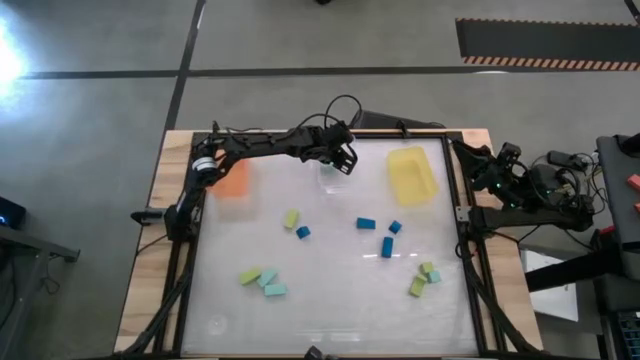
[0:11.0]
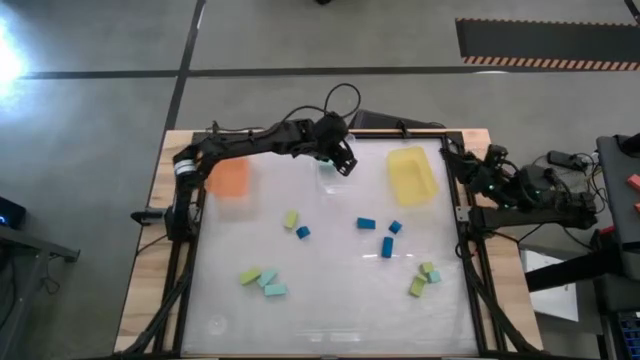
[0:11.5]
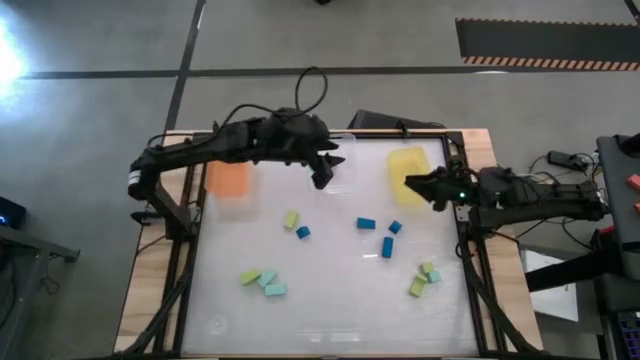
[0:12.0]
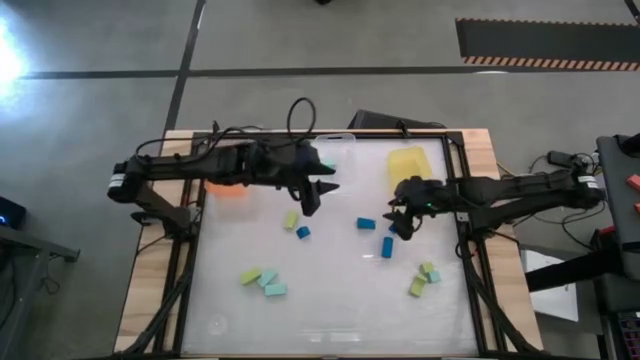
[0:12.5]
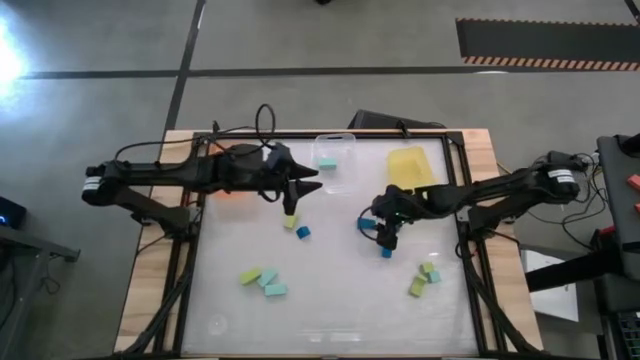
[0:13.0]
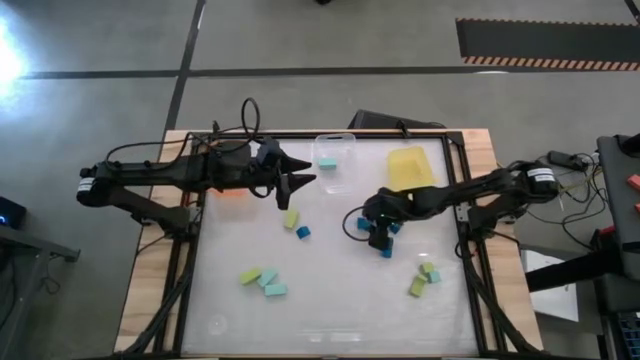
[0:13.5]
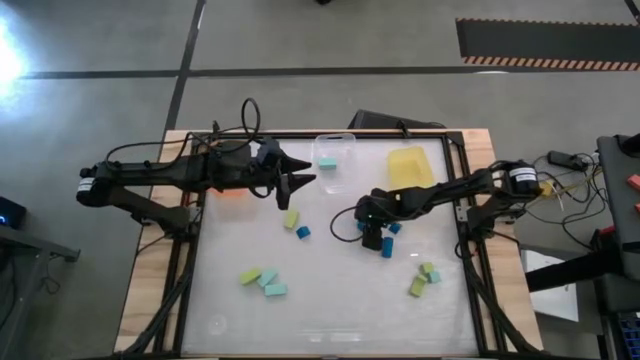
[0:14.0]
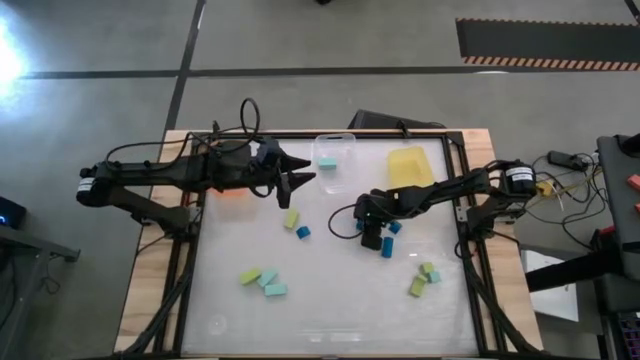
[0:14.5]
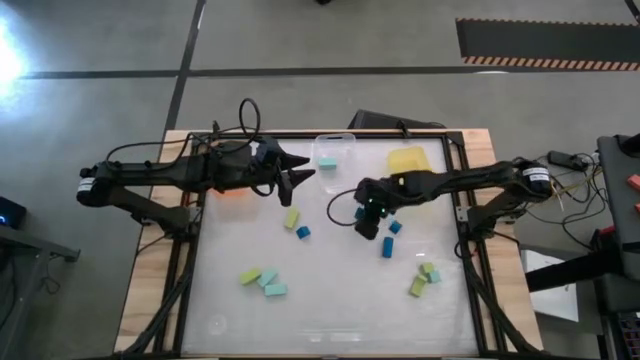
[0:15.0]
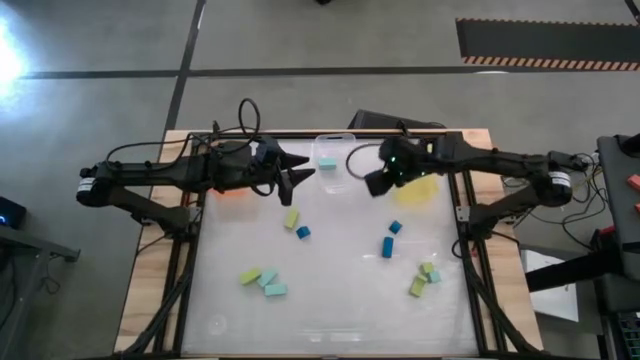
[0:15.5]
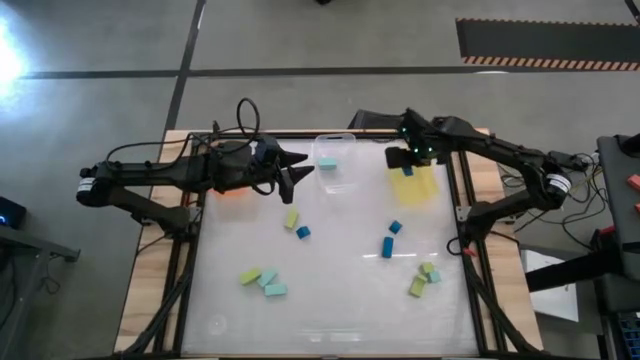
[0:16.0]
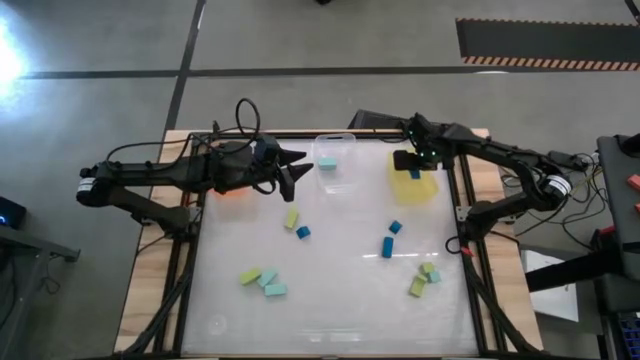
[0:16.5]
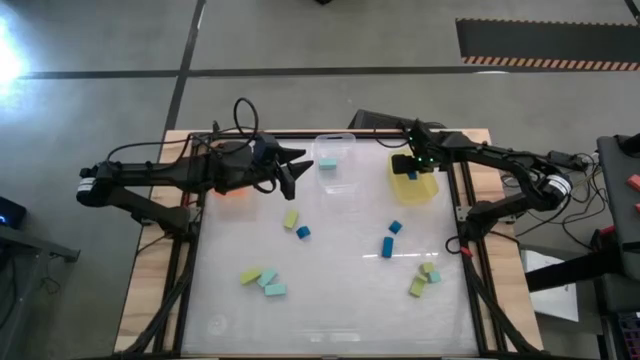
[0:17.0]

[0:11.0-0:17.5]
Task: Sort & place blocks by color
Put the blue block into the yellow bin

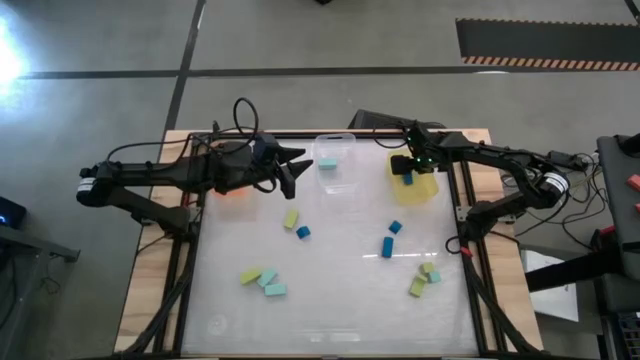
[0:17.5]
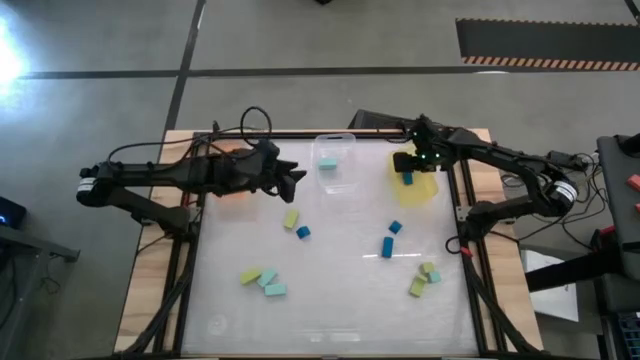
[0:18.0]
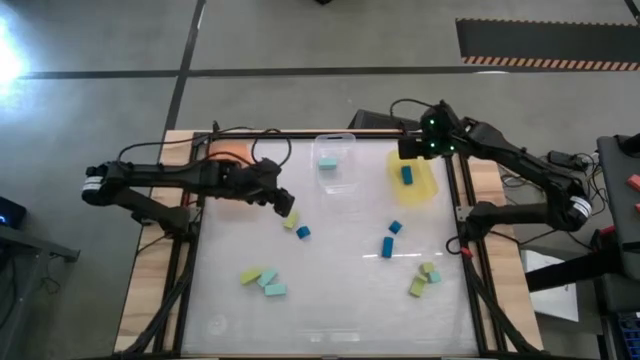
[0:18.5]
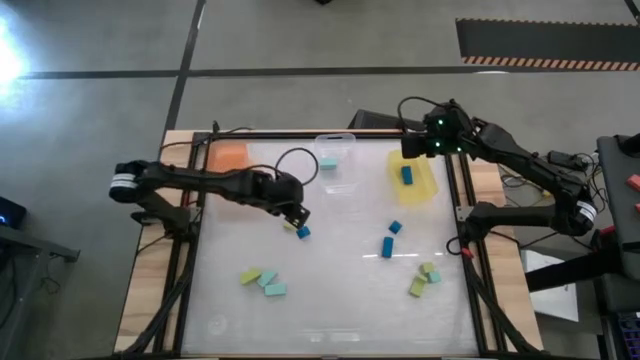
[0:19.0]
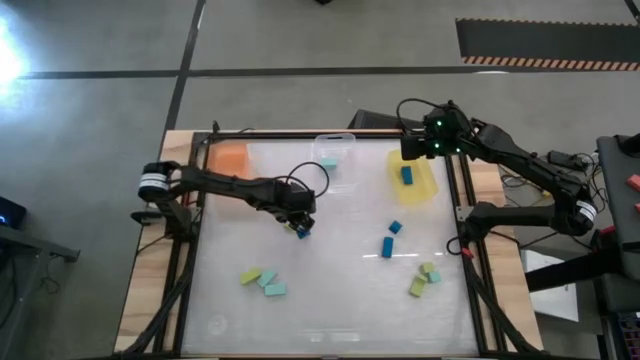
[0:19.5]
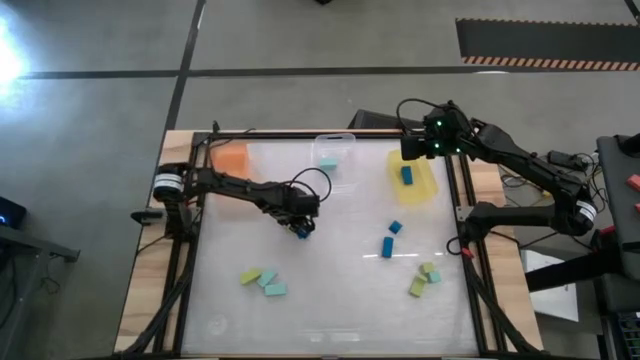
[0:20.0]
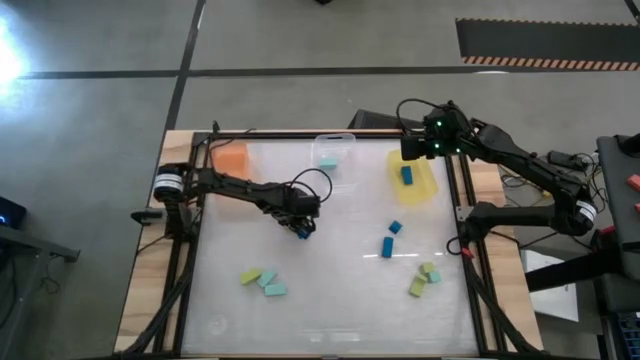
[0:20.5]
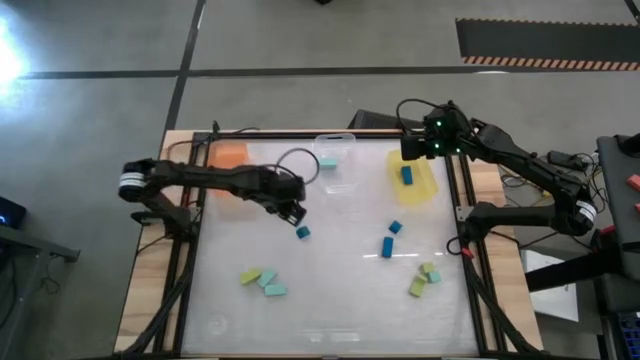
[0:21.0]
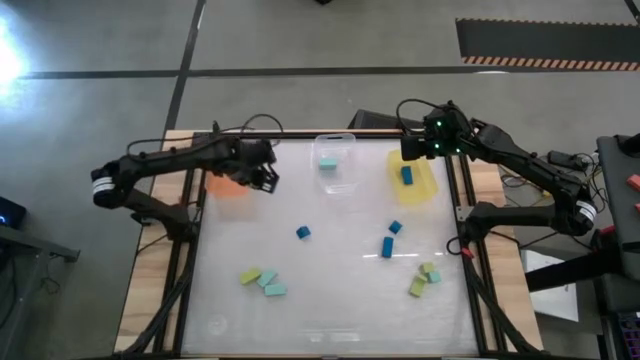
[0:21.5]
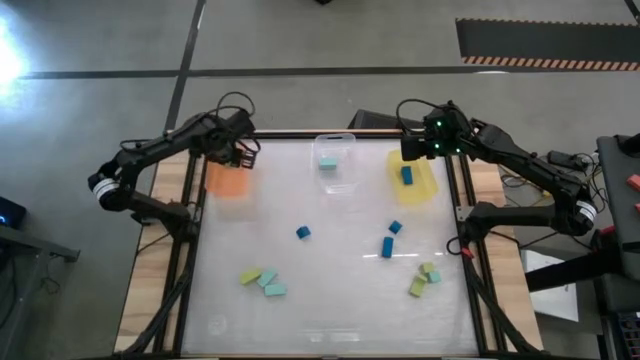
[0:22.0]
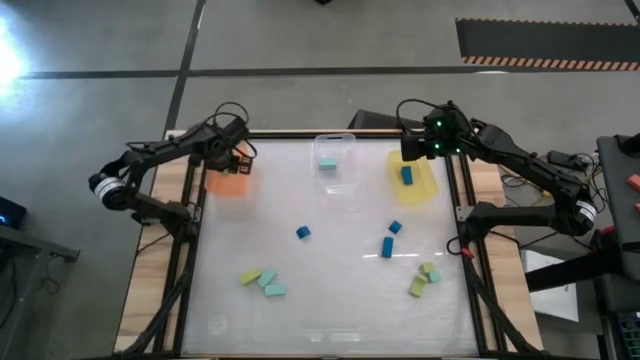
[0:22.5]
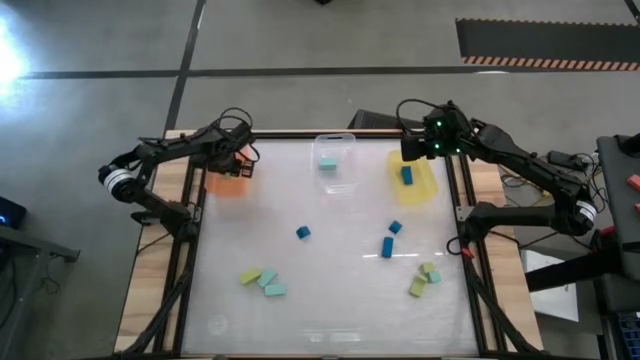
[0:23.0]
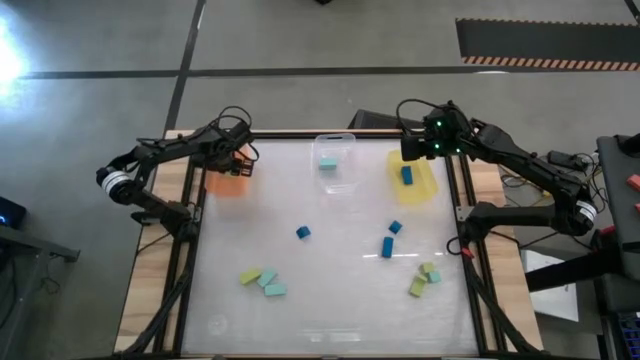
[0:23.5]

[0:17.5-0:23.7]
Put the light green block into the orange bin

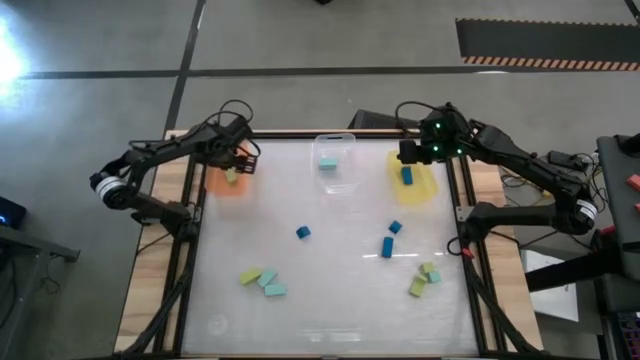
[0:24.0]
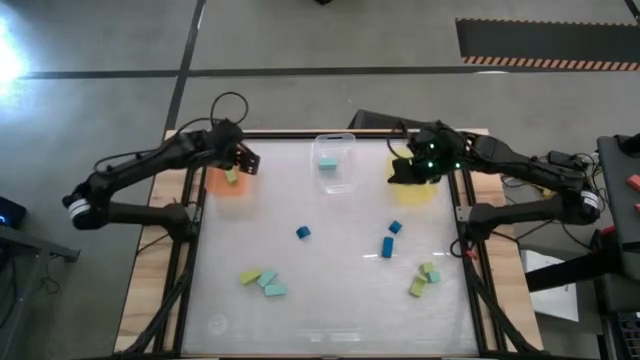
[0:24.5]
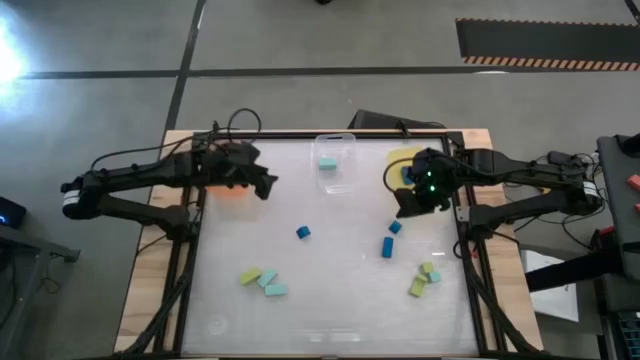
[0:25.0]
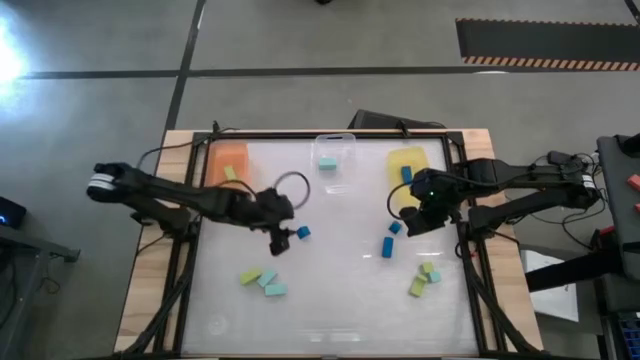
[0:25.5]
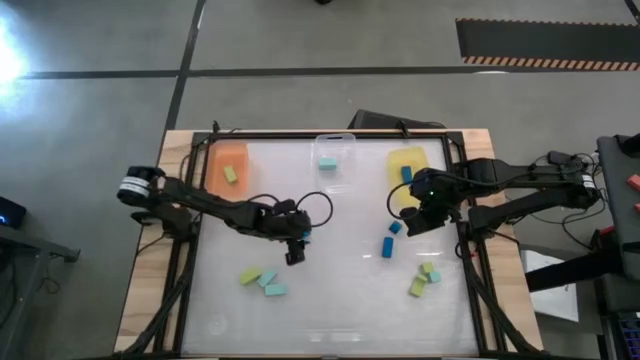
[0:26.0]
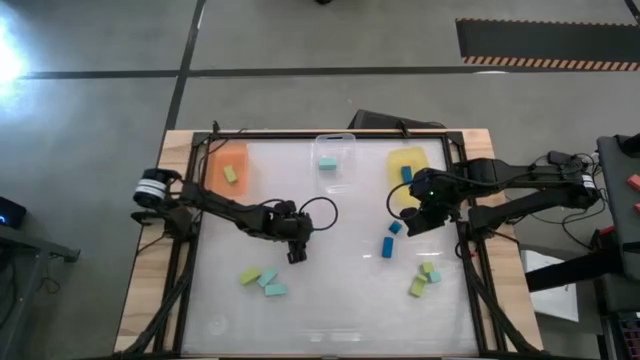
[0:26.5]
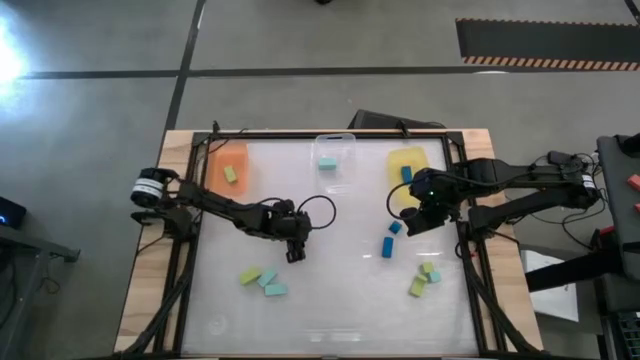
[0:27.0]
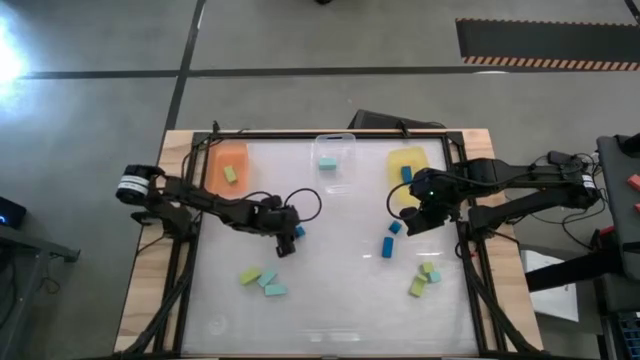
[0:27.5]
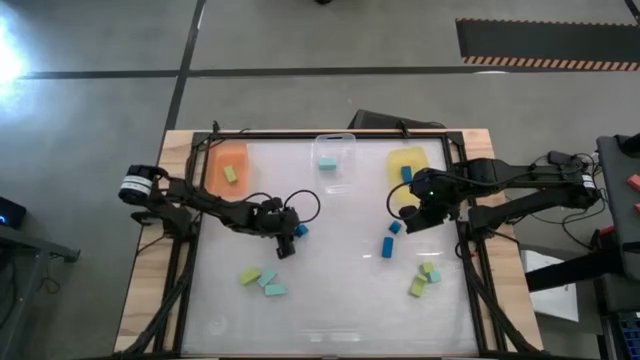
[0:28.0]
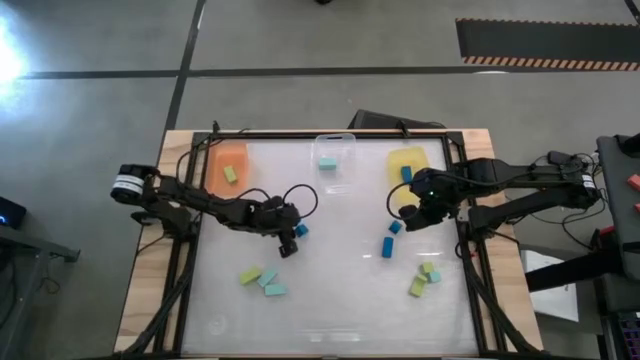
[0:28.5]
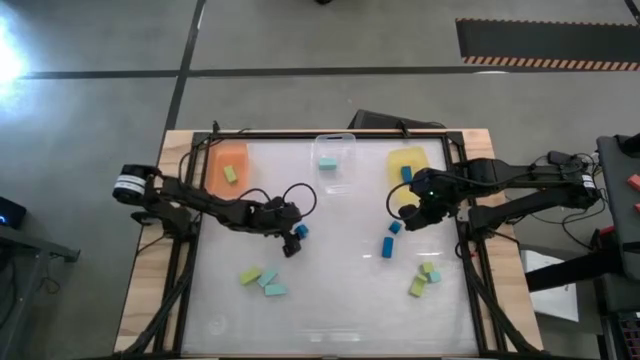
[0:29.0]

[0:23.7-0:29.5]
Put the blue block into the yellow bin

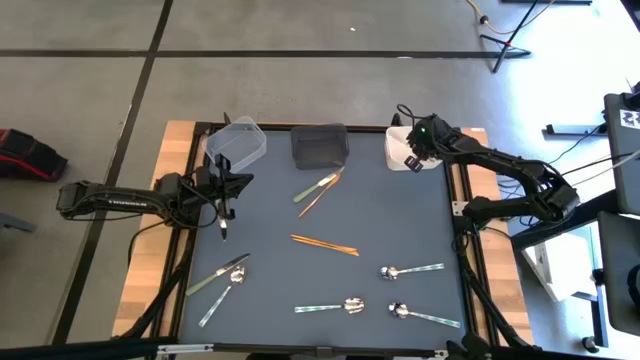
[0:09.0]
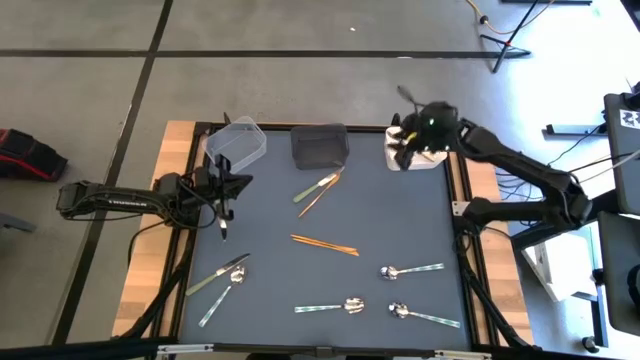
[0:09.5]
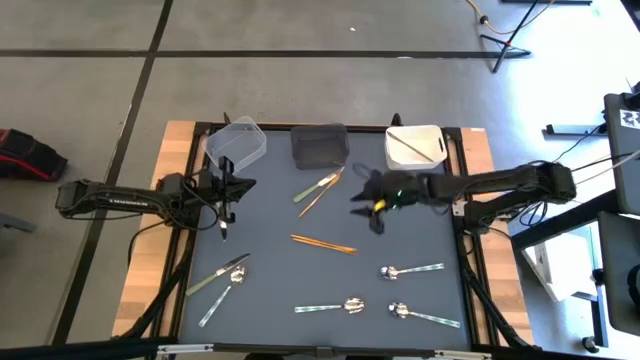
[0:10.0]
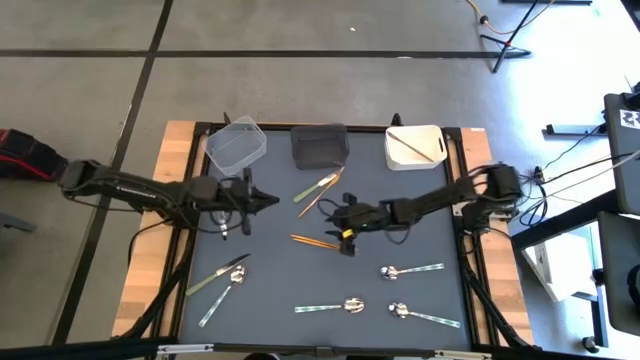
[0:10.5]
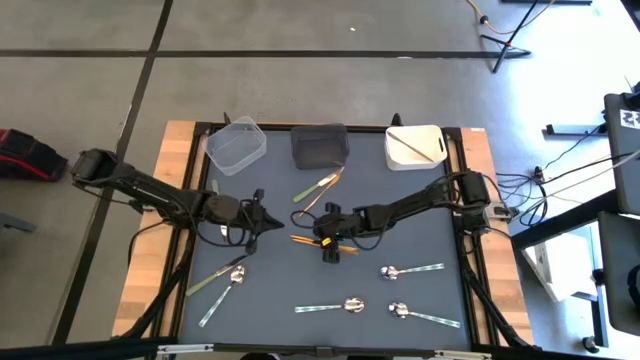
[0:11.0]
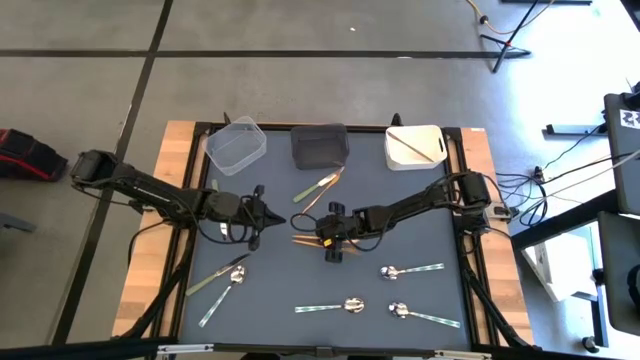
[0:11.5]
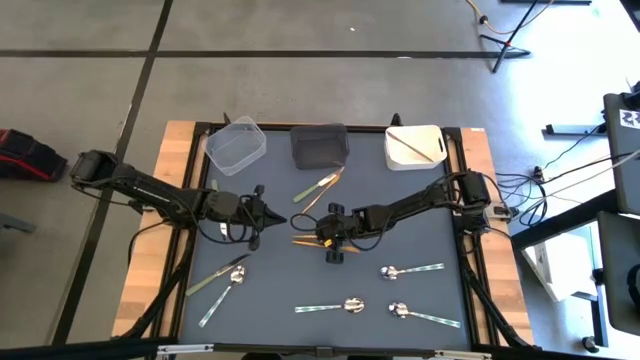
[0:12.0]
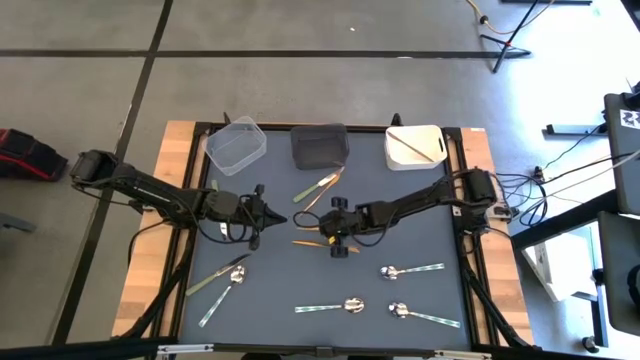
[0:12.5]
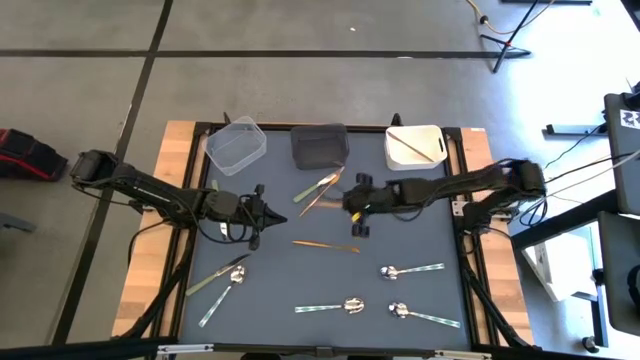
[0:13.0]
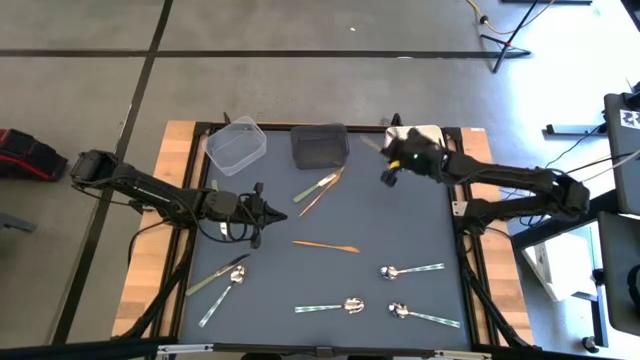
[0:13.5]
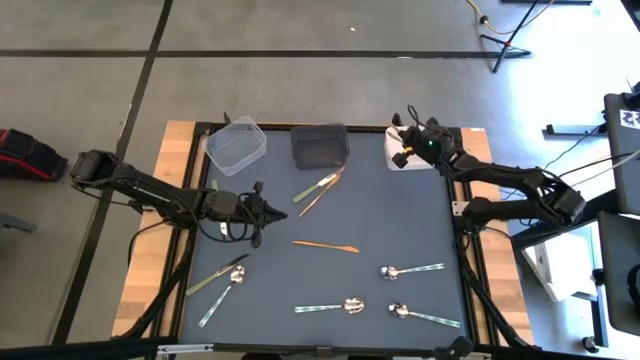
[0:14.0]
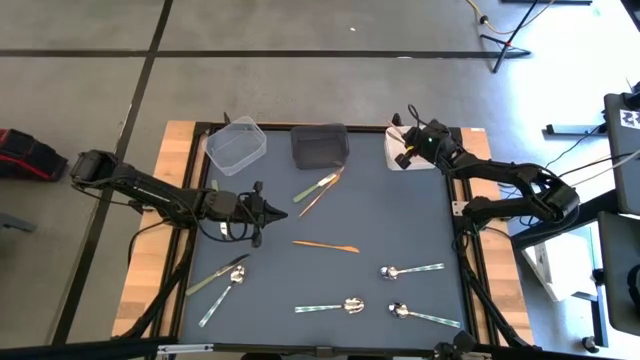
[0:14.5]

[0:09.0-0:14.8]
Task: Sort silverware by color (type)
Put the middle gold table knife into the white bin
